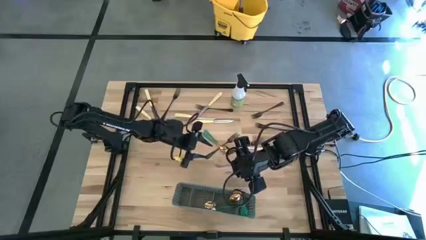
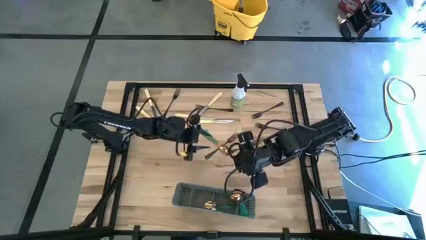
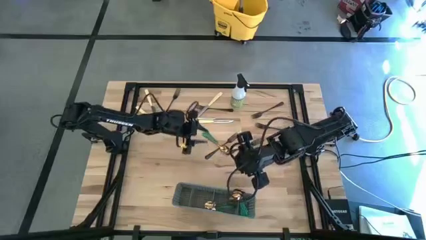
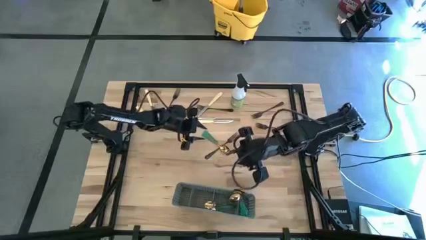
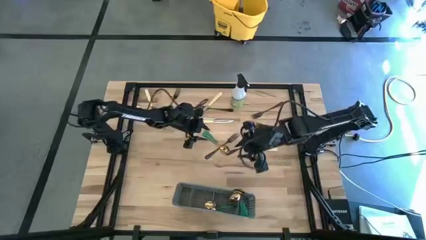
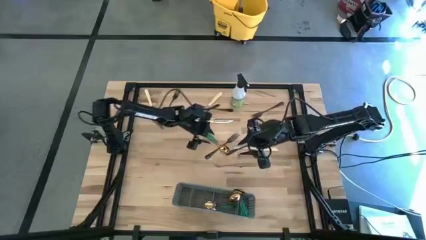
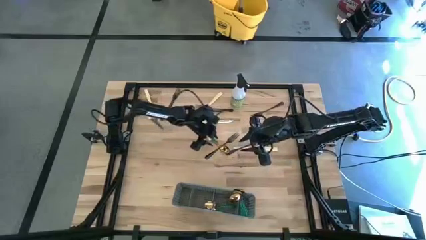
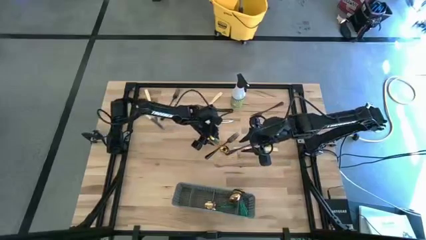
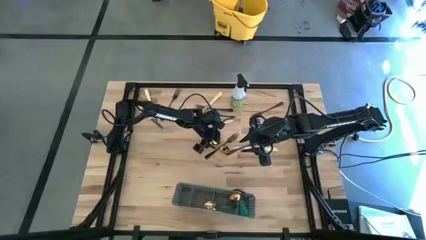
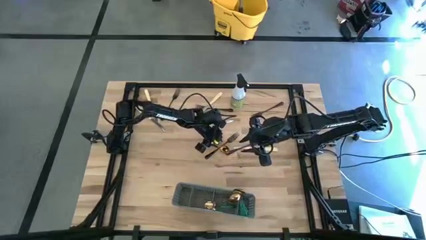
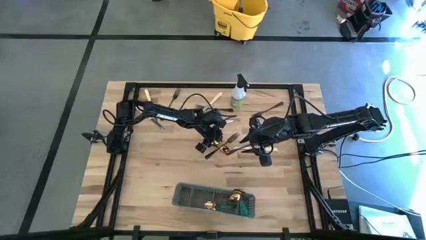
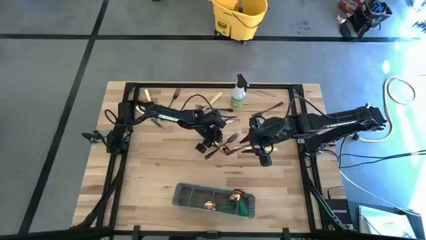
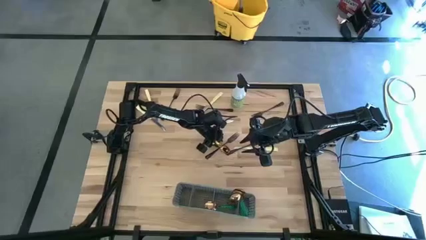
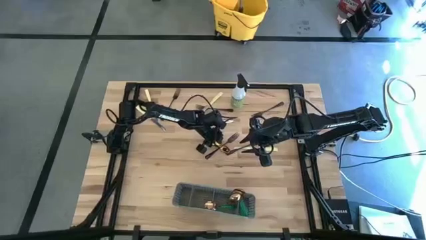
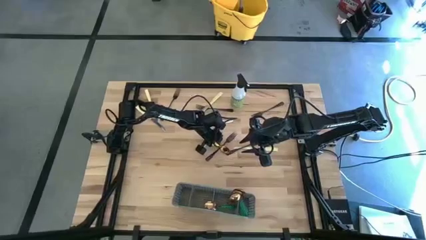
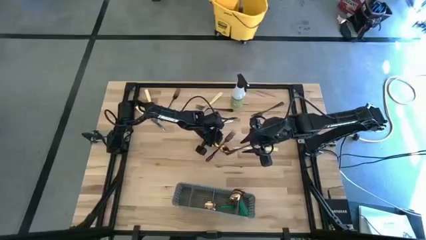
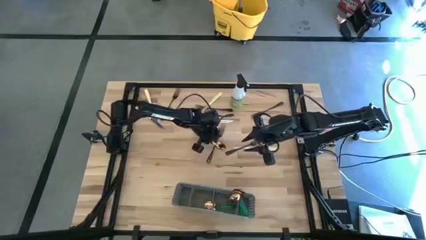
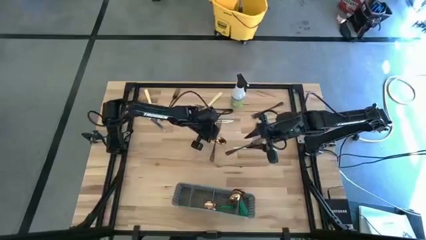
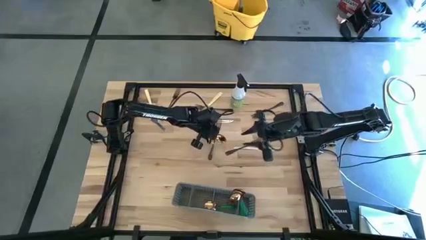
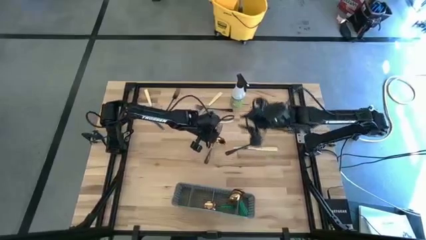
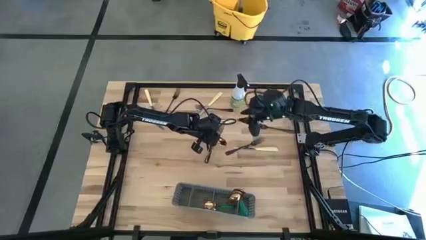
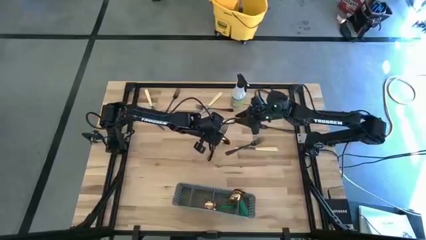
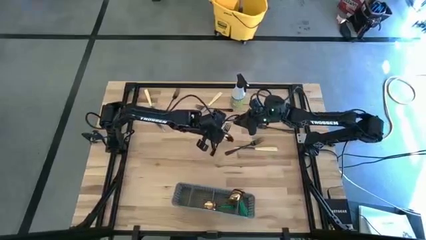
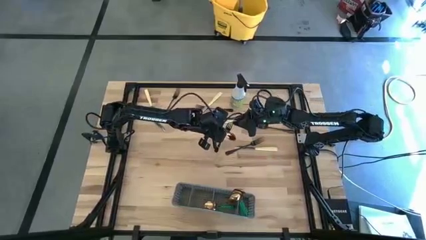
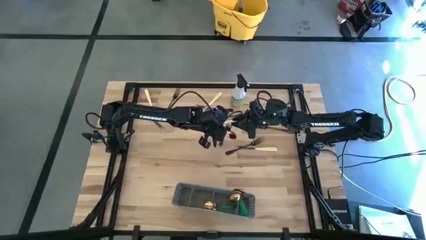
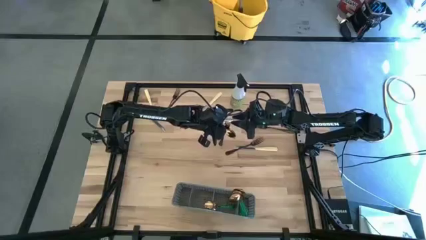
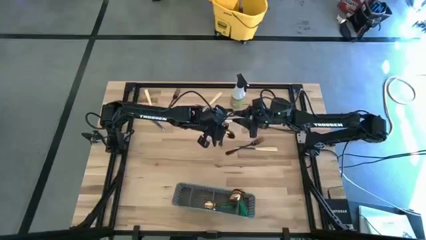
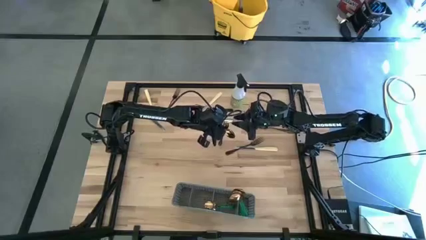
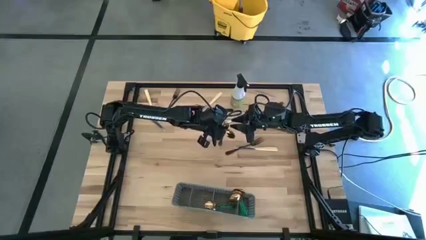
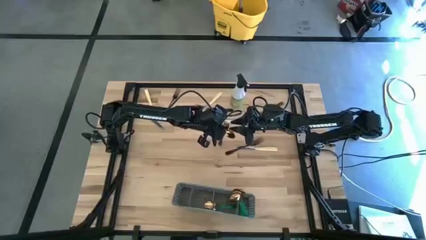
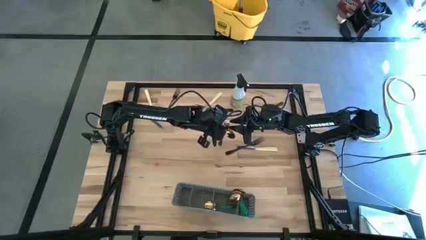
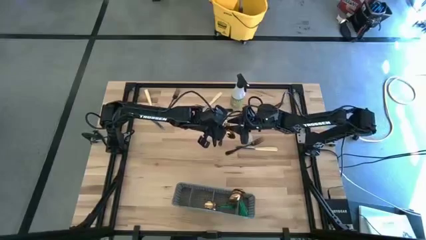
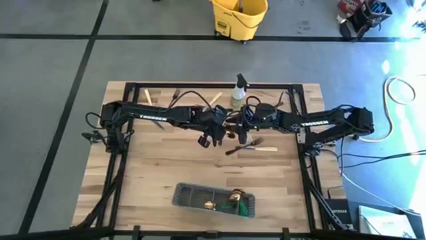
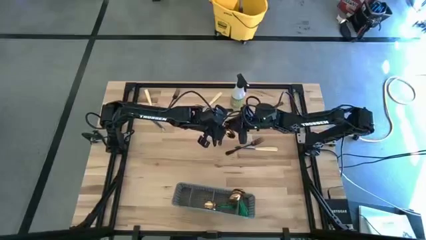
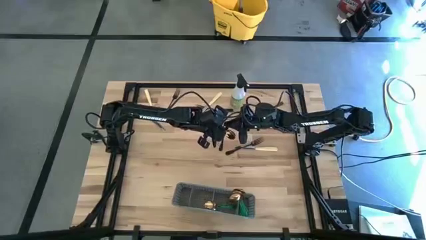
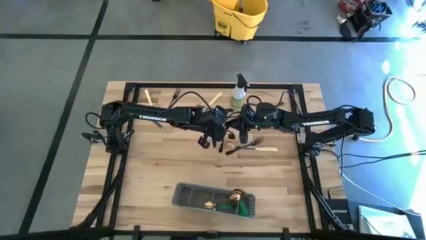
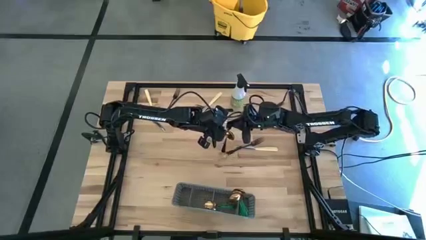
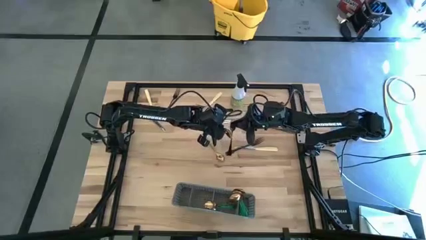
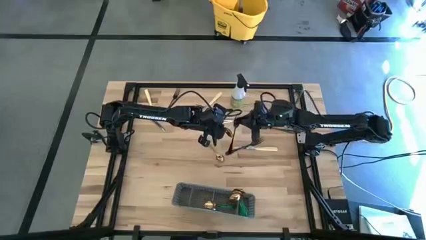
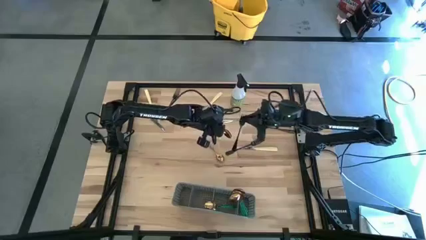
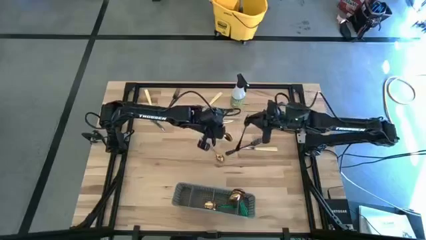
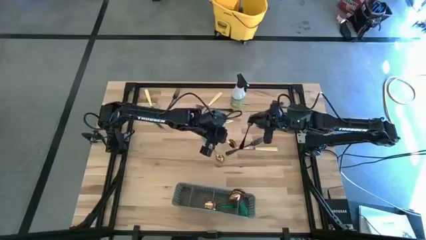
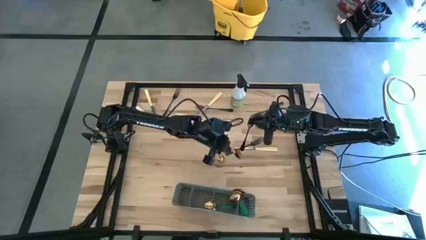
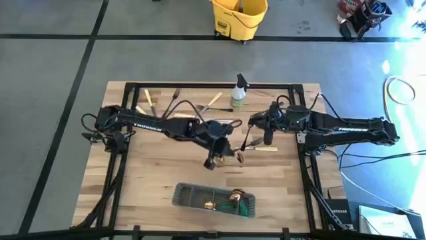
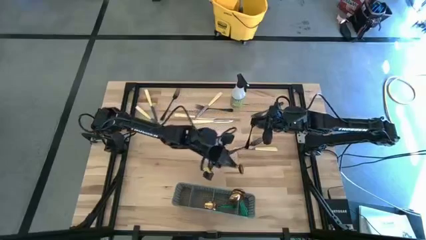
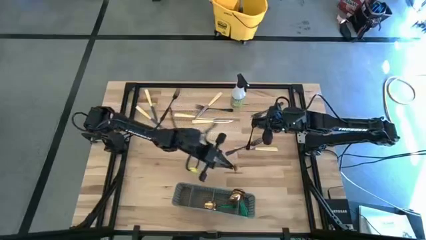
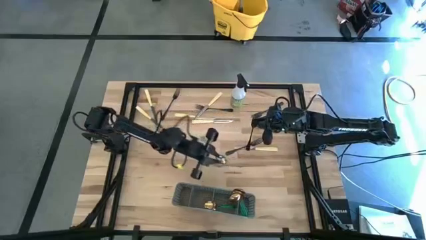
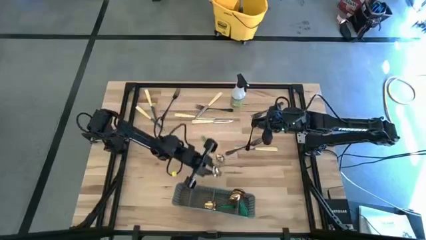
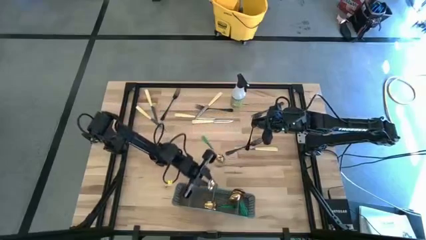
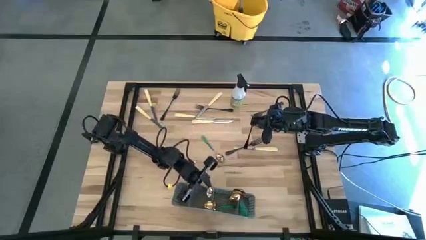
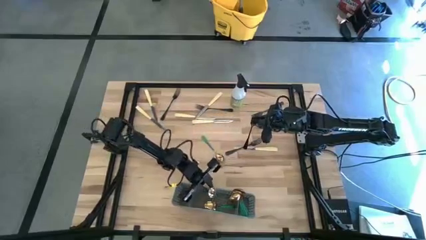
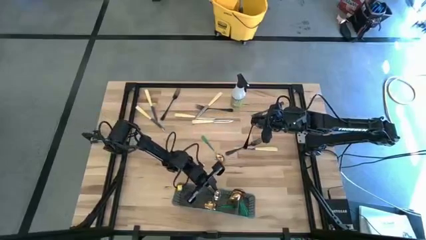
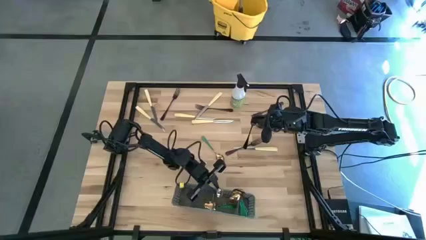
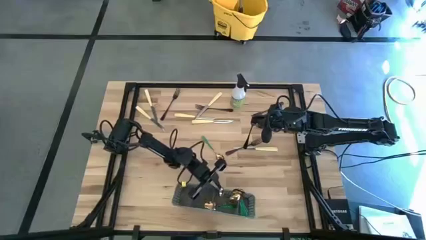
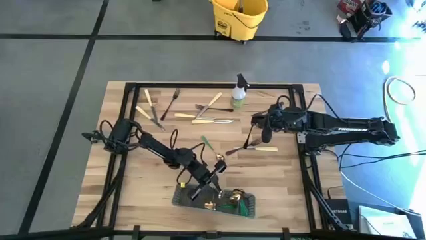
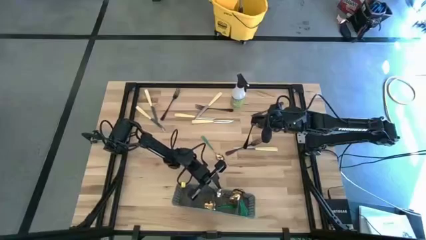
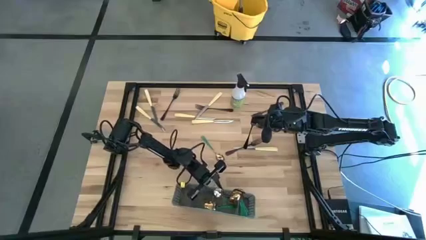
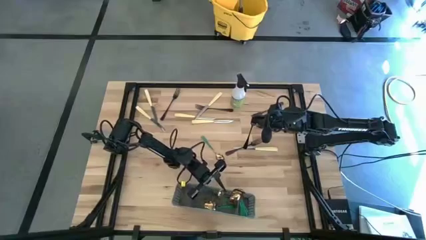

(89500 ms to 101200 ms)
Task: Sort silverware
Put the top green spoon into the gray cutlery rack

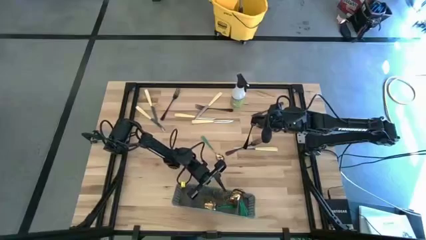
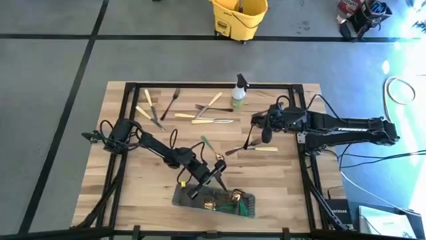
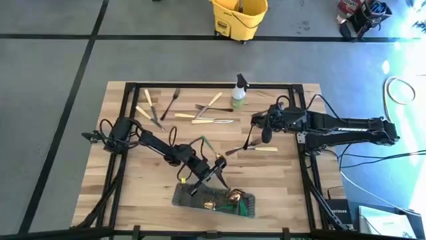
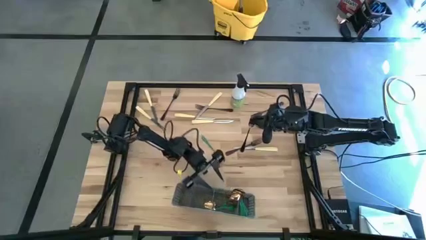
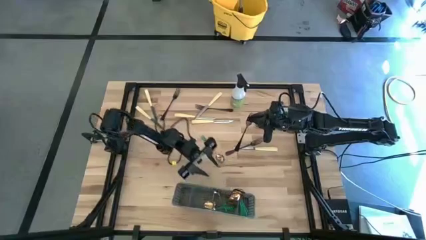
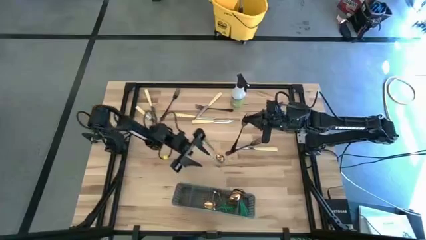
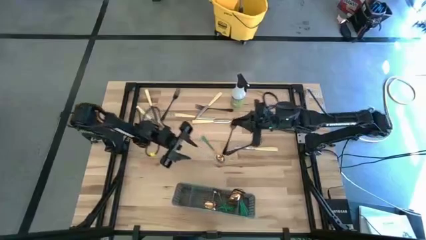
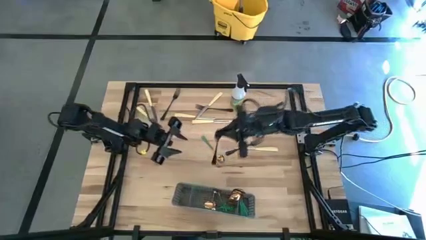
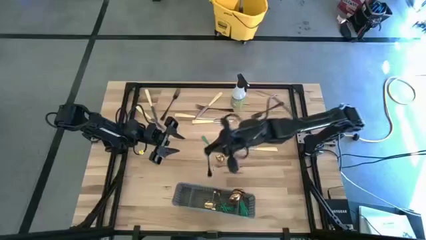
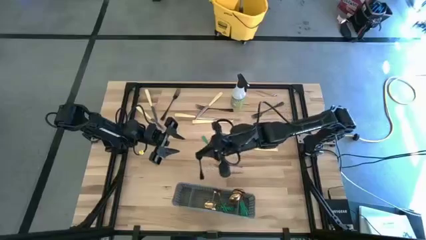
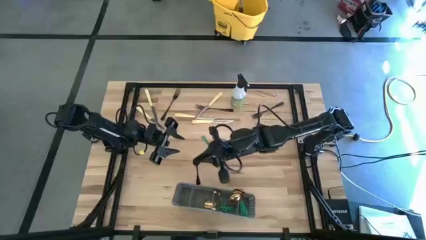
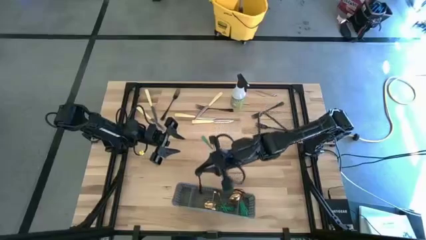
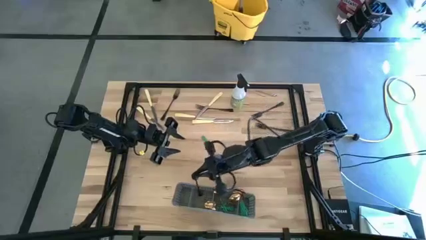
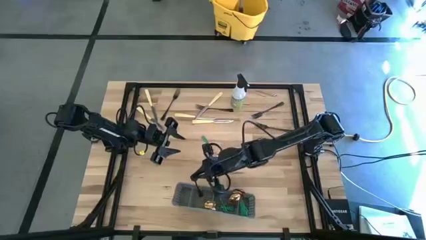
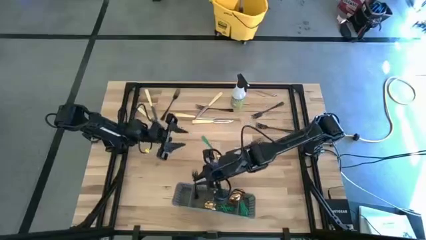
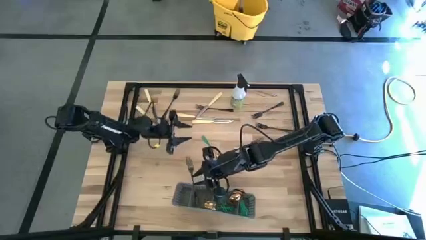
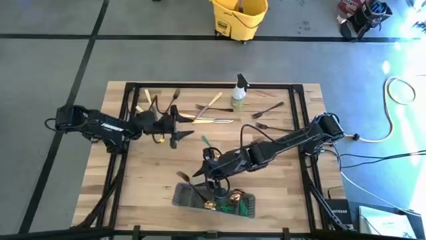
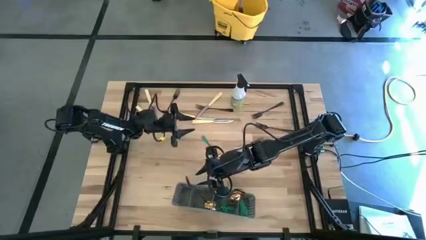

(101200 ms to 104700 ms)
Put the black fork into the gray cutlery rack
